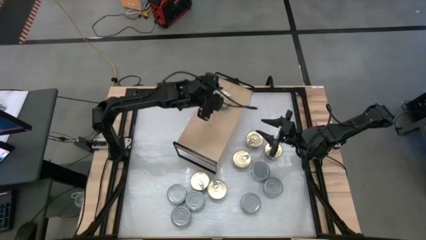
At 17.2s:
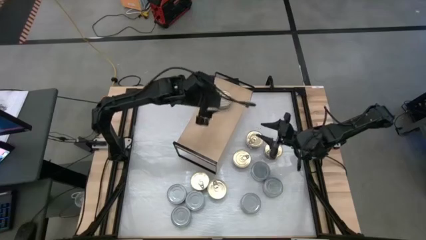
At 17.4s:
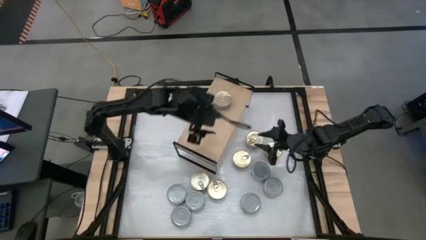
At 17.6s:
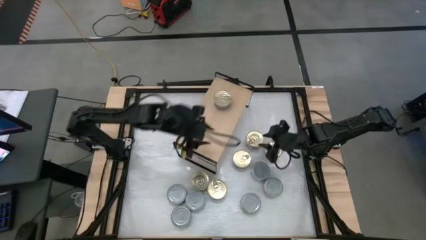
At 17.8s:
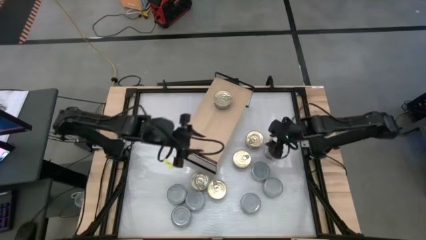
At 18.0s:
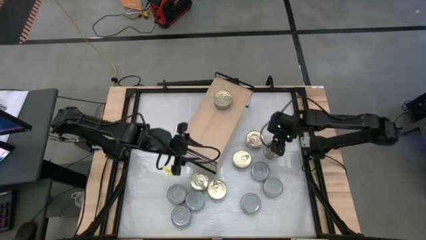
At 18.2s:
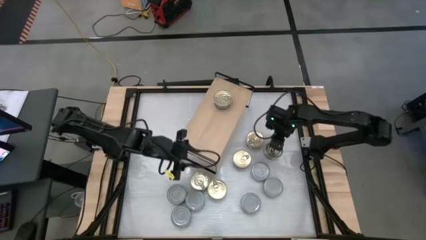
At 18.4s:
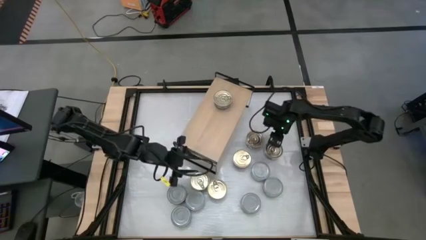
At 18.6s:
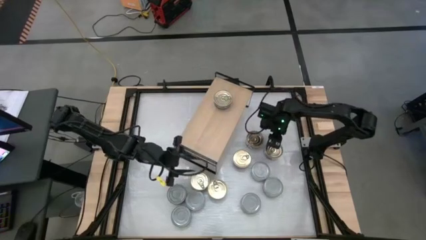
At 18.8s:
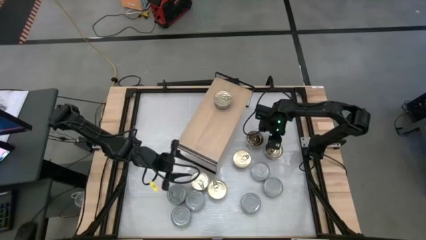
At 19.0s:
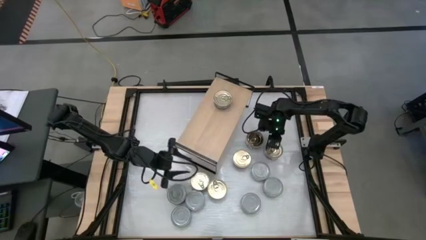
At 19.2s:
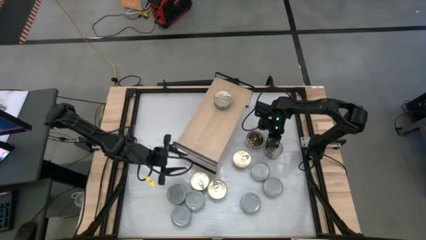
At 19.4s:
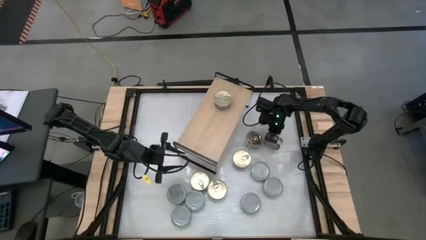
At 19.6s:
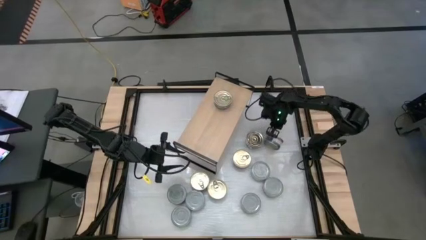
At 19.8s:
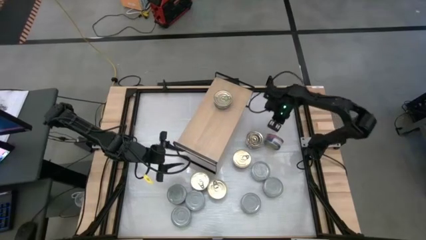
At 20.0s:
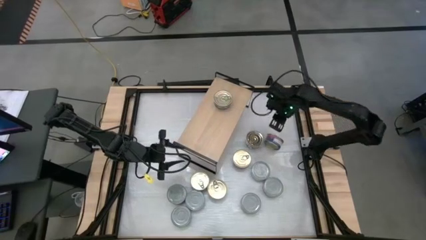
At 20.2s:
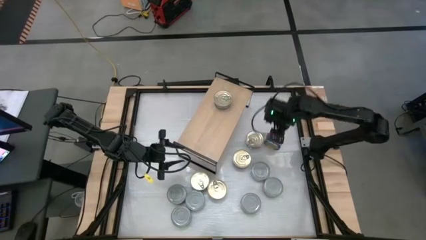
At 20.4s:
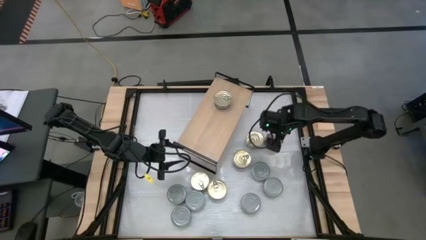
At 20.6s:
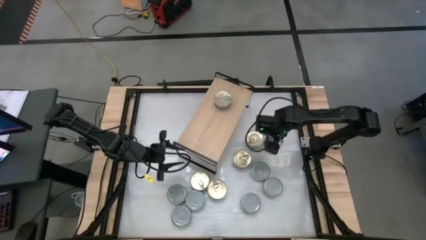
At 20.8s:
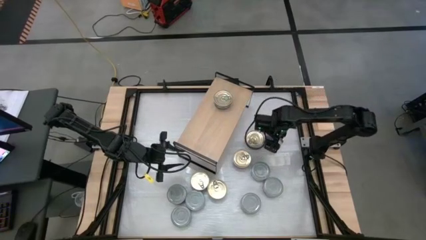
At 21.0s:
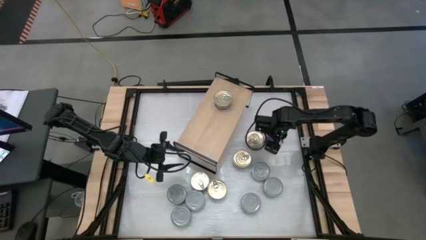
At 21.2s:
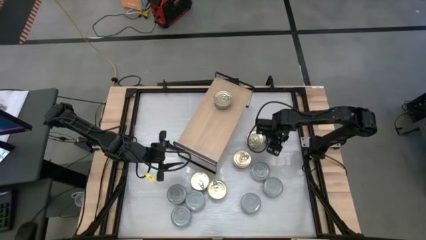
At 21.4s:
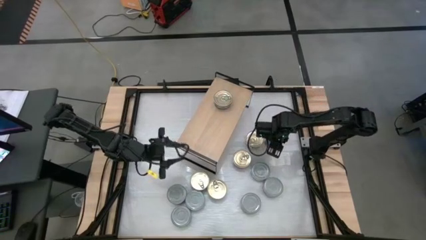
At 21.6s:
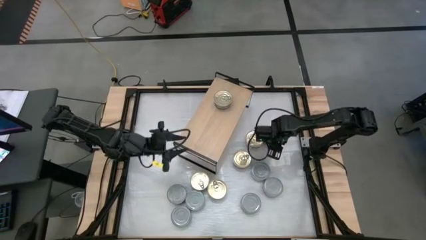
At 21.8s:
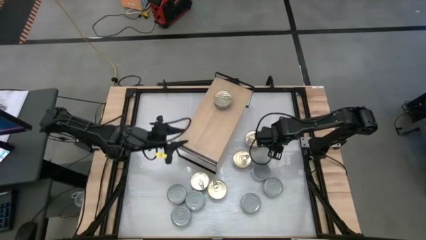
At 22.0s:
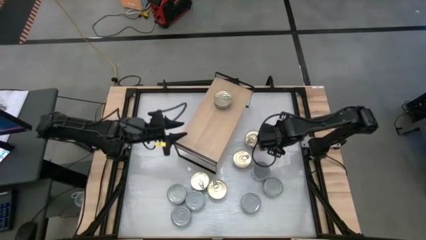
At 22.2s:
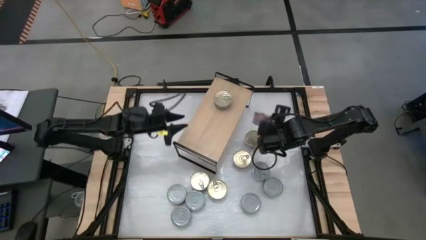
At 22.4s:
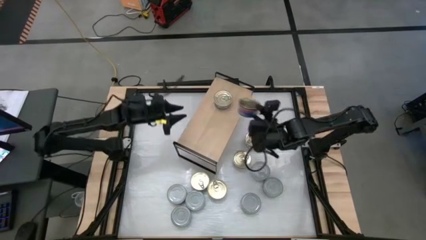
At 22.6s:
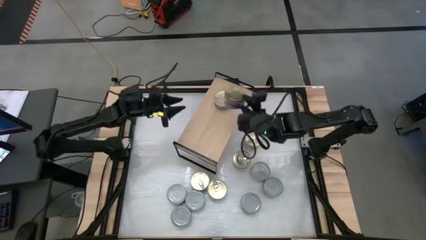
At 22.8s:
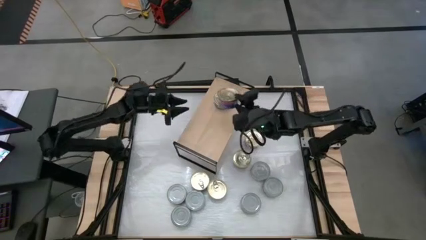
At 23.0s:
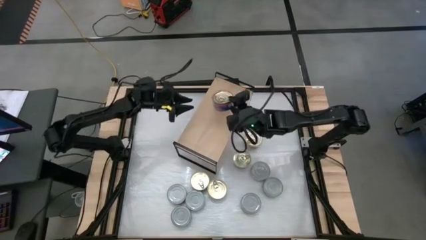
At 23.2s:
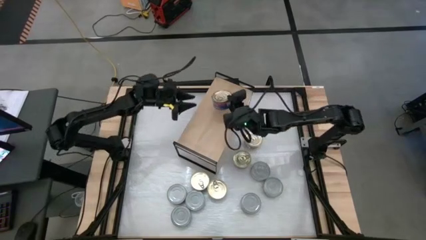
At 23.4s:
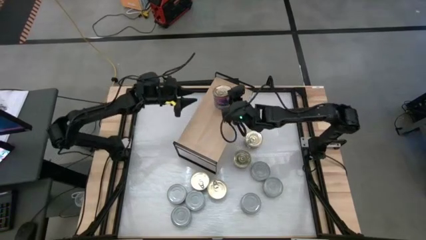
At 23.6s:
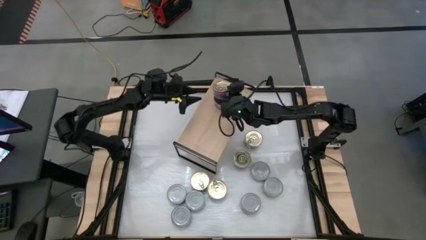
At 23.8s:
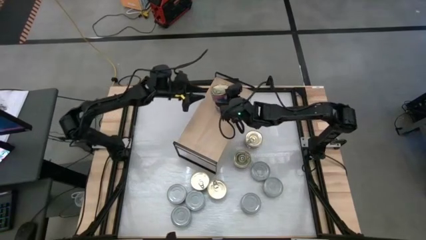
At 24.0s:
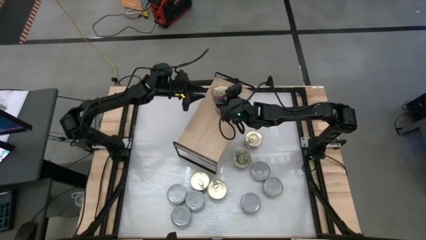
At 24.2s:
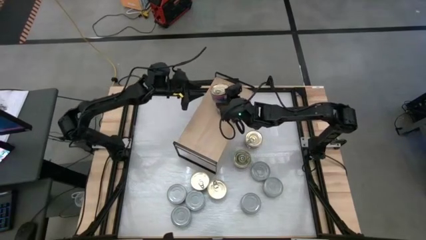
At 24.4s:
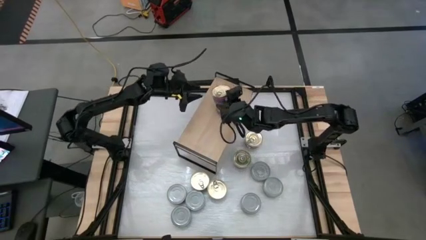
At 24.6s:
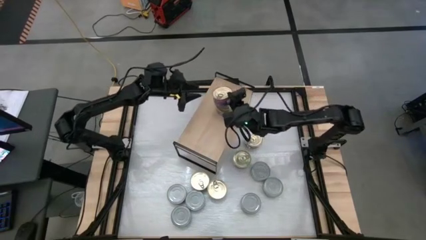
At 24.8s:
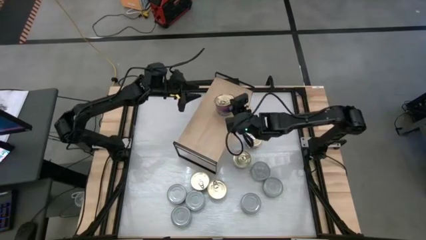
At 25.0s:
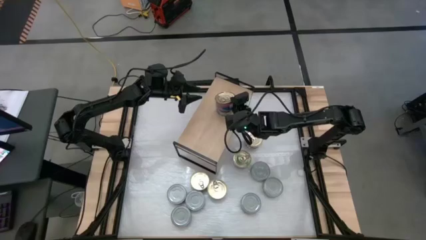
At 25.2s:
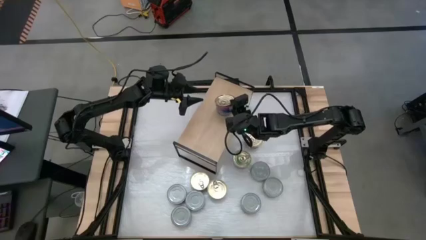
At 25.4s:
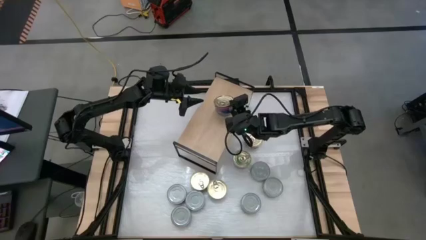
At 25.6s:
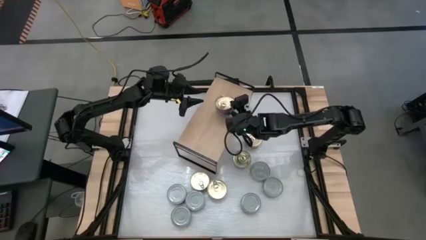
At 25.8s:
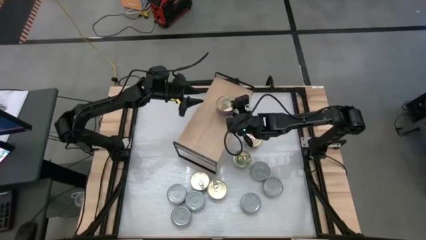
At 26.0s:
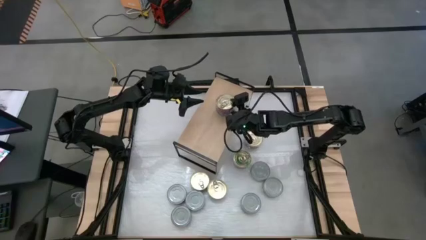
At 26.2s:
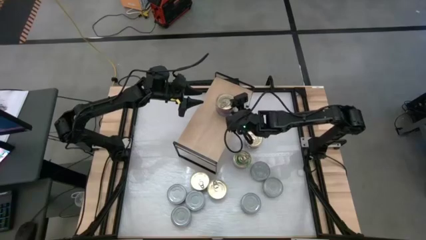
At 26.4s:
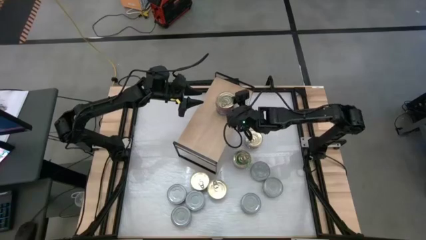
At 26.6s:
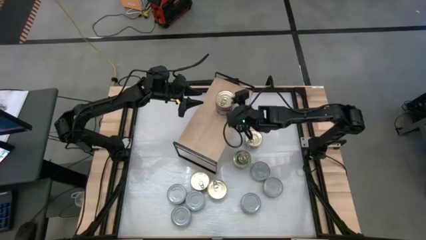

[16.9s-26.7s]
Task: Stack canned seafood by type on shelf
Stack the blue tuna can on top of the blue tuna can on the shelf
